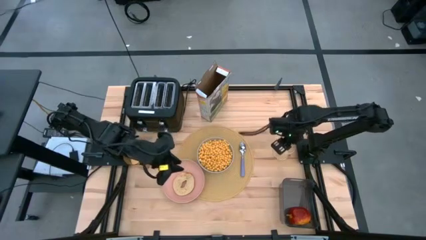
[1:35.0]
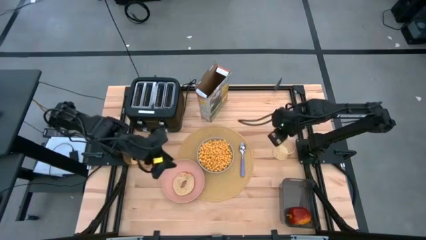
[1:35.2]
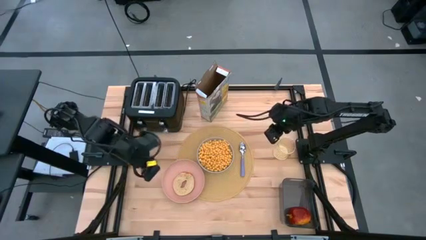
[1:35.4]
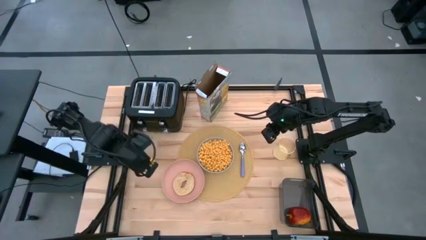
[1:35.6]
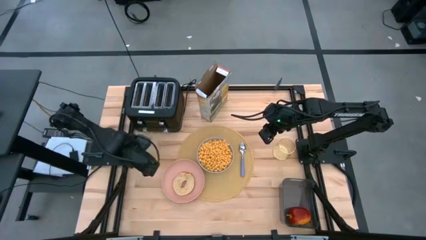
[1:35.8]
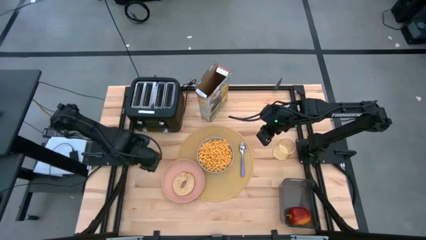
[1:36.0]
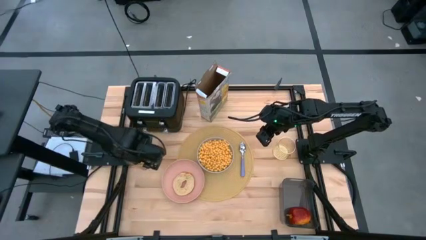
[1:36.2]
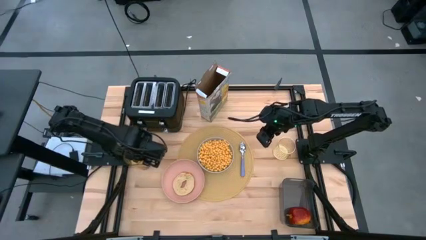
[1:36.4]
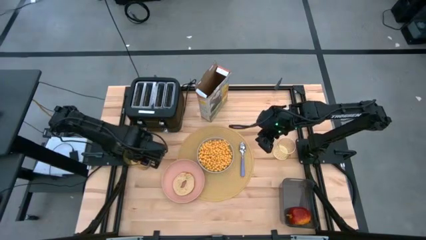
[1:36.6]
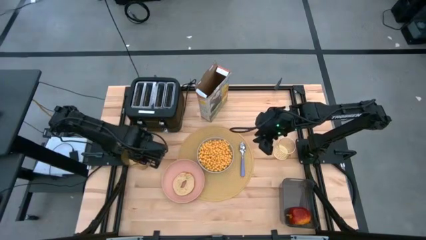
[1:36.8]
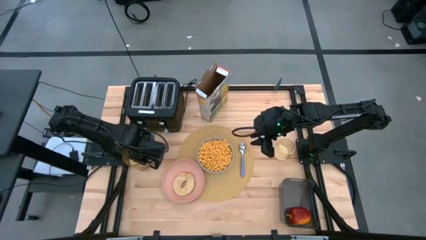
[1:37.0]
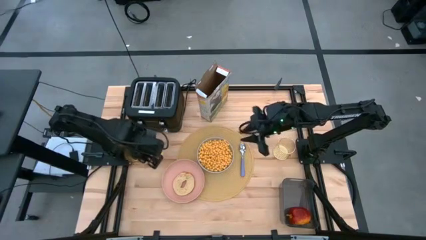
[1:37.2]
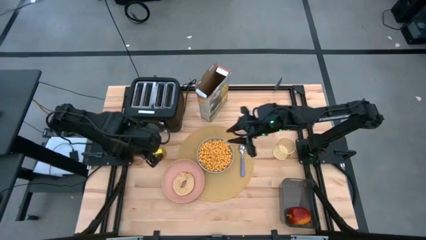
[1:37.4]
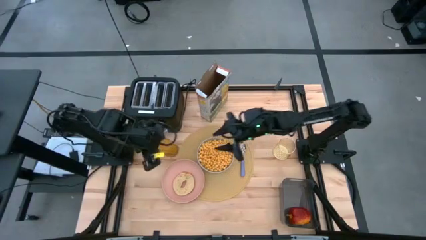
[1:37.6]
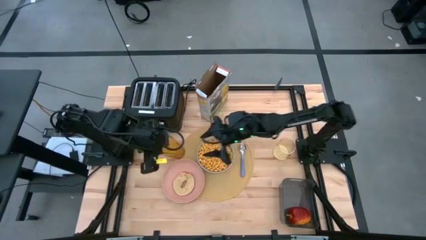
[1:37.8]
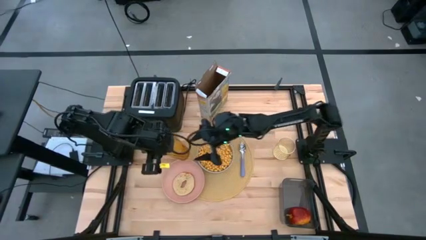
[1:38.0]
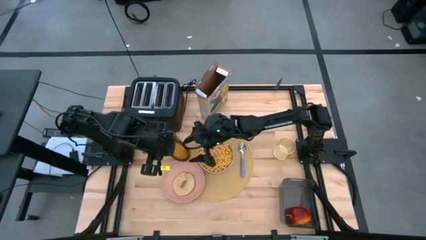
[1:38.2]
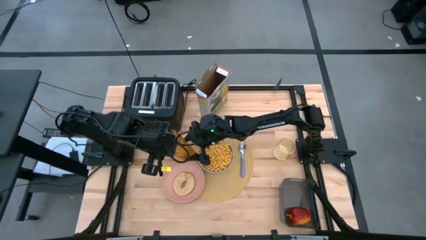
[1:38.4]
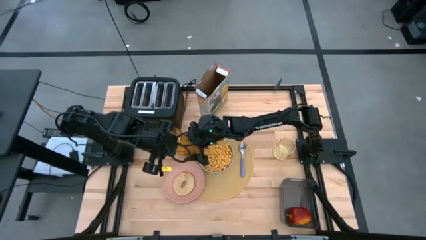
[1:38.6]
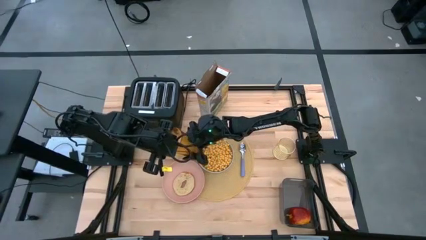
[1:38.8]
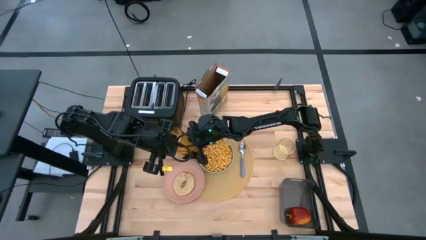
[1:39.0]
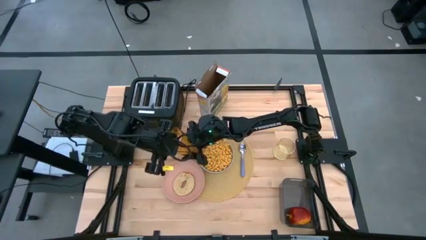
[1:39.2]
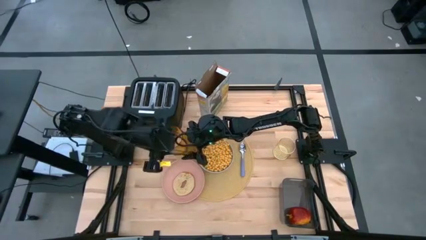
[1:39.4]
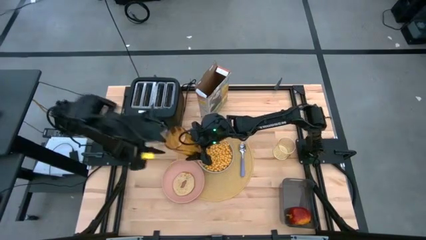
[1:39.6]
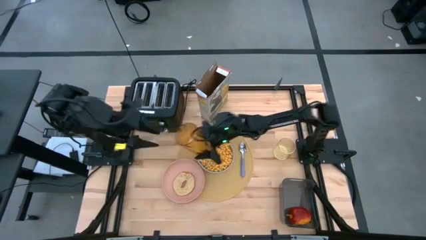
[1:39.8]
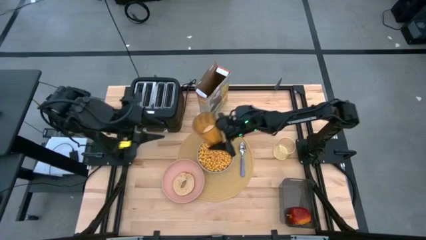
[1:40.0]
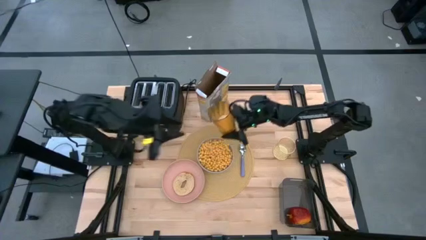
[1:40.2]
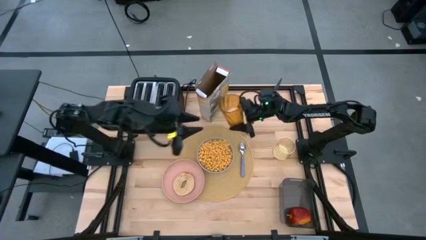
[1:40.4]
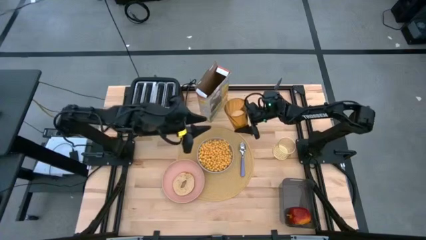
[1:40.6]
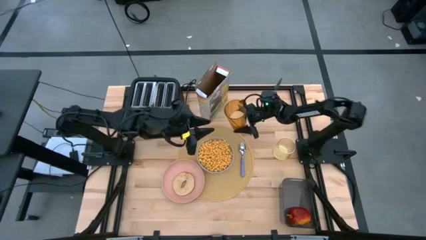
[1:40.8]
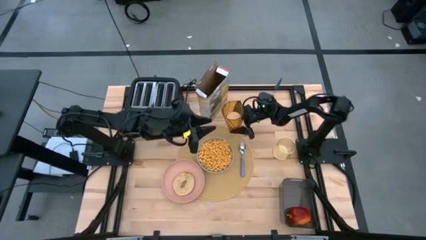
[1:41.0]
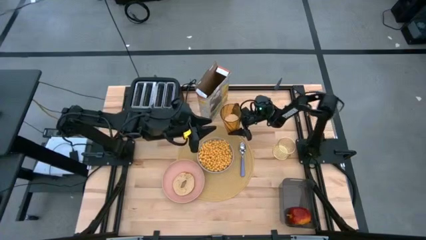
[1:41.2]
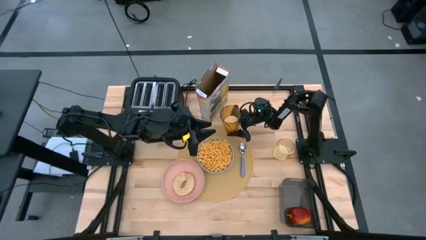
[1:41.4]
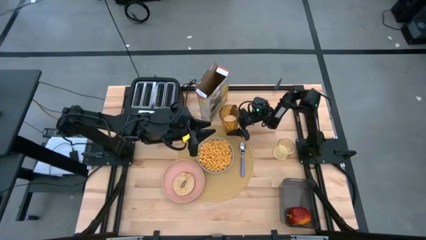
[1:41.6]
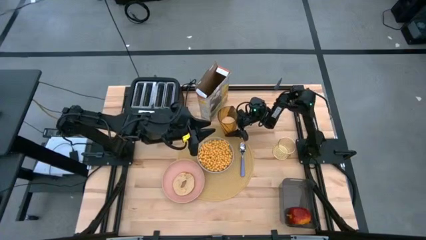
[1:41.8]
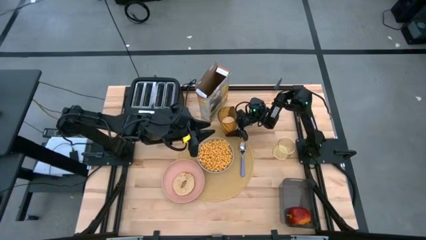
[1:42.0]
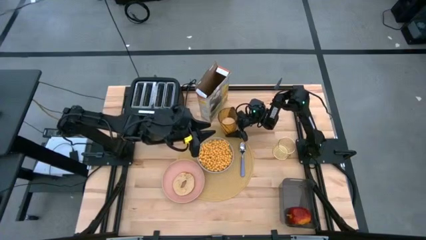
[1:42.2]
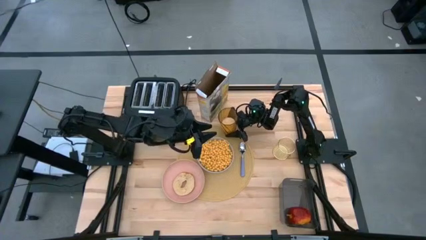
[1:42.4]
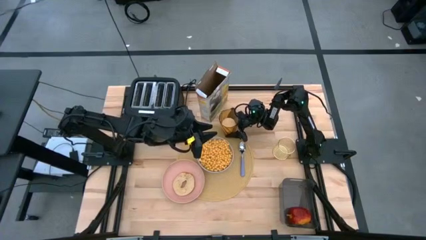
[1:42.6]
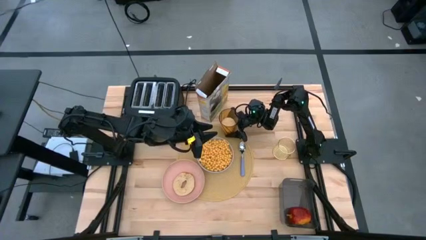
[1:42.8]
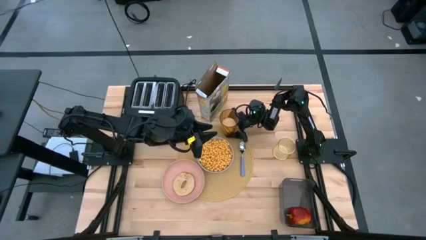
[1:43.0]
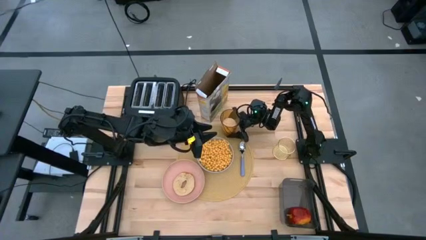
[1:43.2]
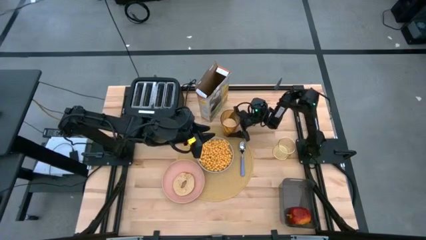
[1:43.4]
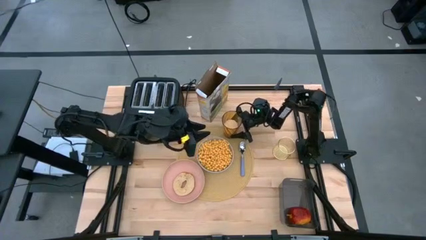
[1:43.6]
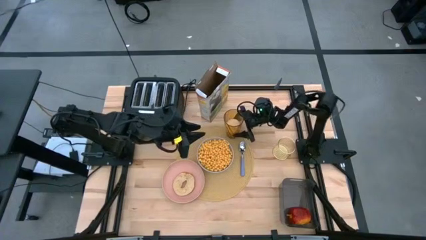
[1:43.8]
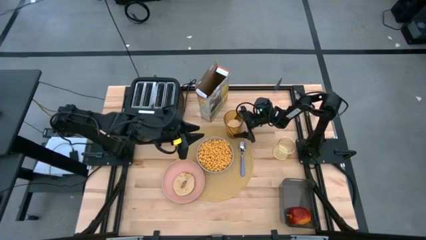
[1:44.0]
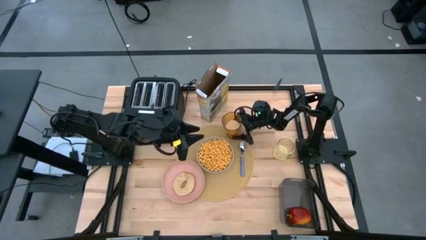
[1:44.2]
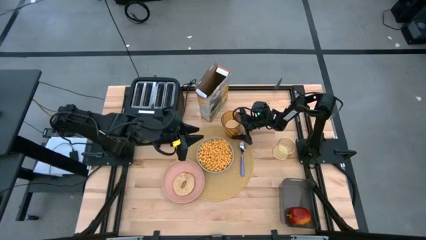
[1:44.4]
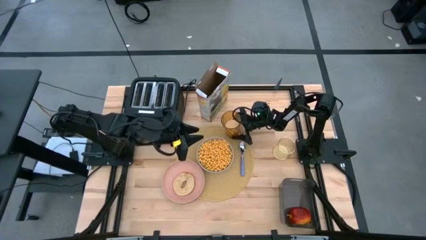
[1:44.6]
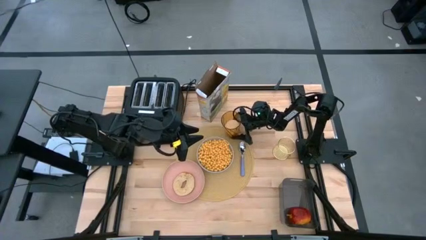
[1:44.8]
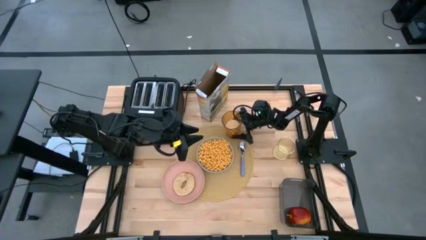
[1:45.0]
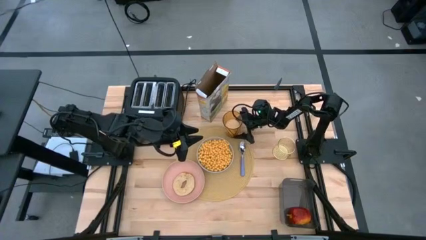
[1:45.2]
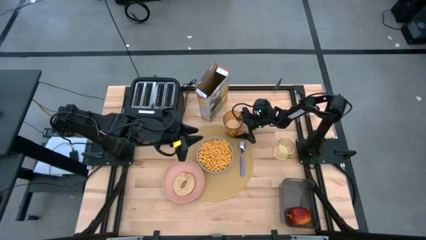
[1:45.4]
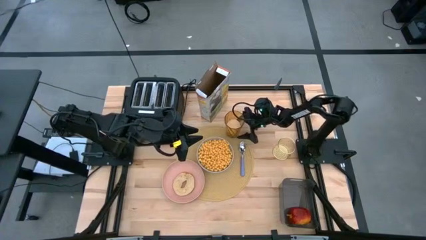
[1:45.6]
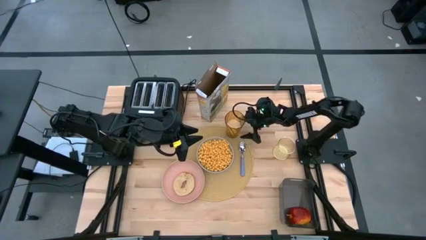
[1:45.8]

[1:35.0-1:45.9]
Task: Arrange a breakfast setting
Put the yellow cup on the brown placemat to the top right of the gray bowl

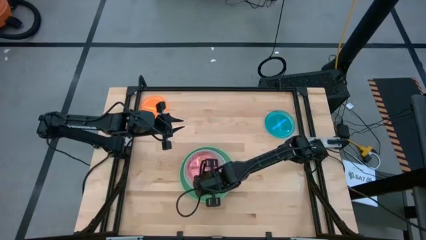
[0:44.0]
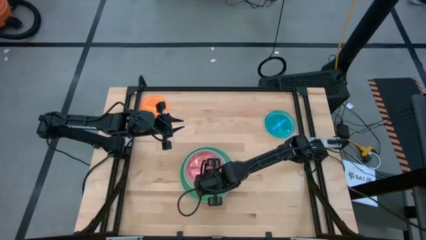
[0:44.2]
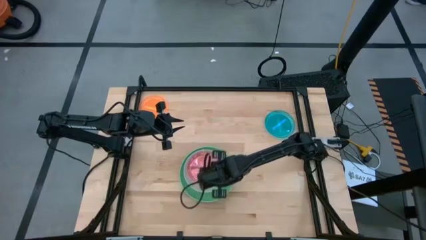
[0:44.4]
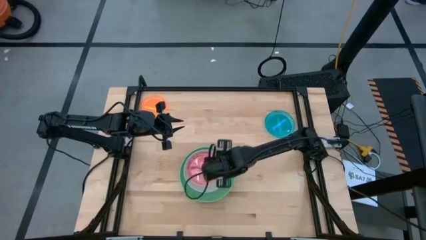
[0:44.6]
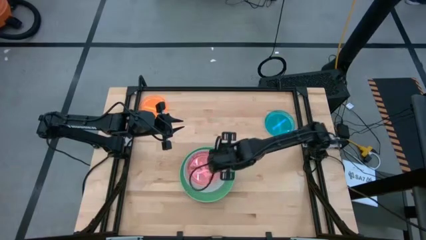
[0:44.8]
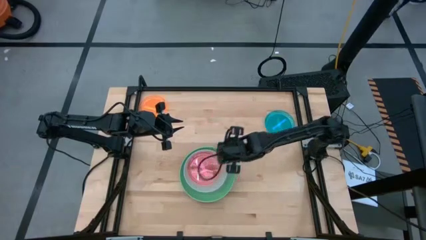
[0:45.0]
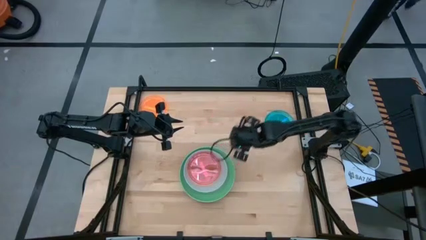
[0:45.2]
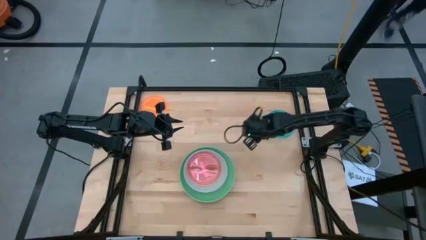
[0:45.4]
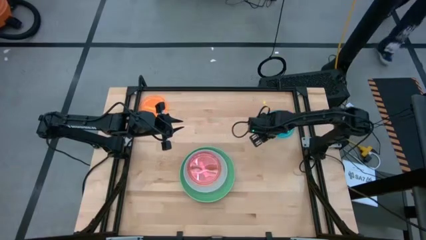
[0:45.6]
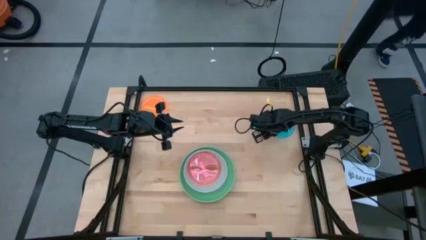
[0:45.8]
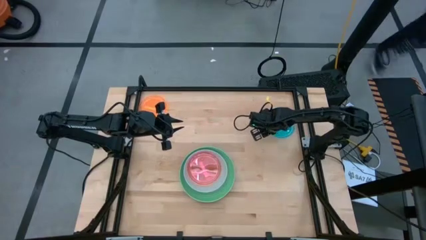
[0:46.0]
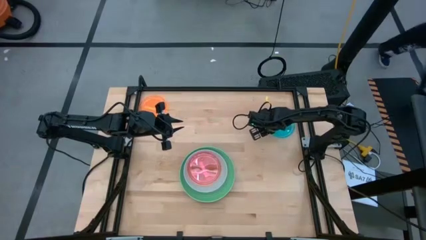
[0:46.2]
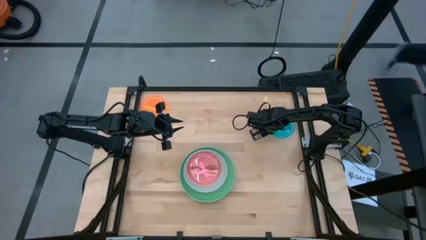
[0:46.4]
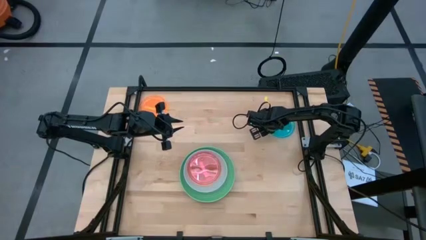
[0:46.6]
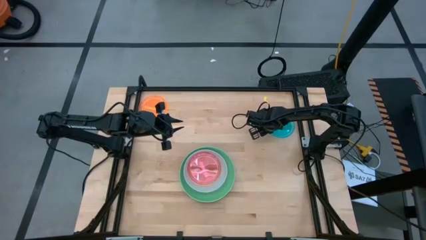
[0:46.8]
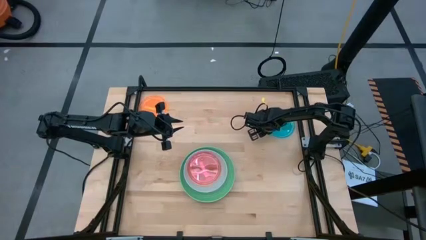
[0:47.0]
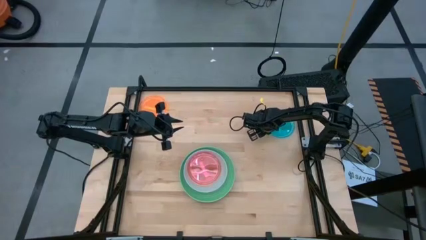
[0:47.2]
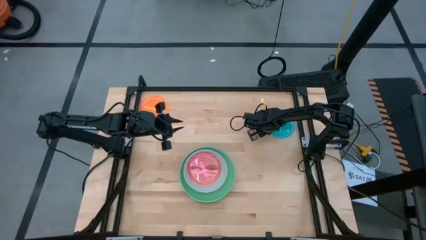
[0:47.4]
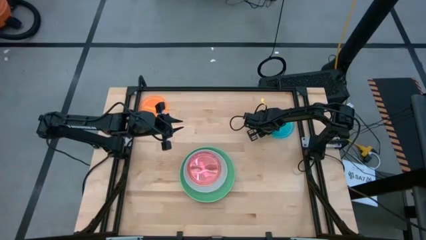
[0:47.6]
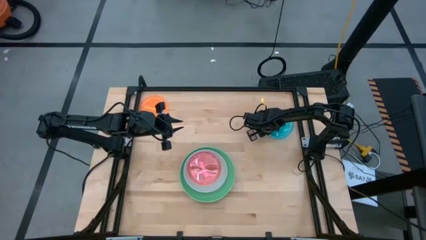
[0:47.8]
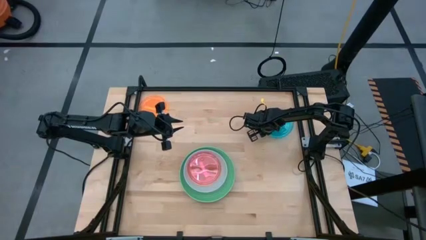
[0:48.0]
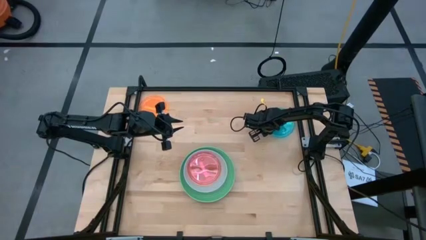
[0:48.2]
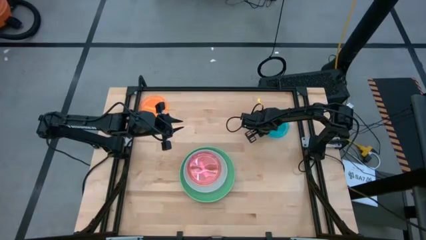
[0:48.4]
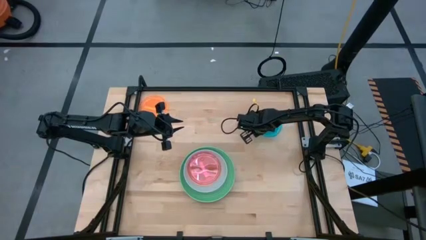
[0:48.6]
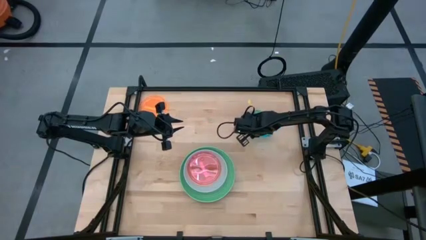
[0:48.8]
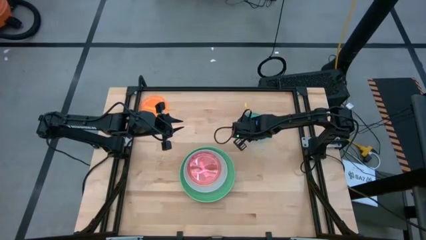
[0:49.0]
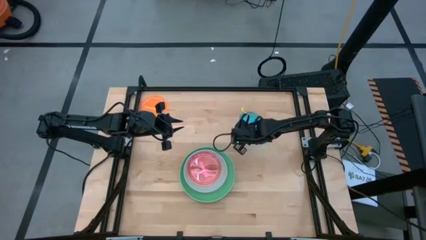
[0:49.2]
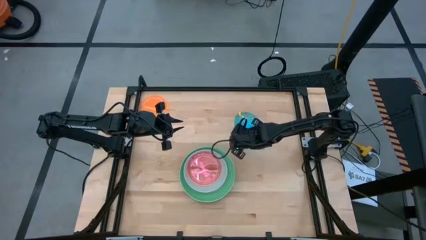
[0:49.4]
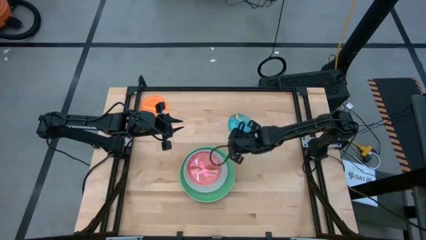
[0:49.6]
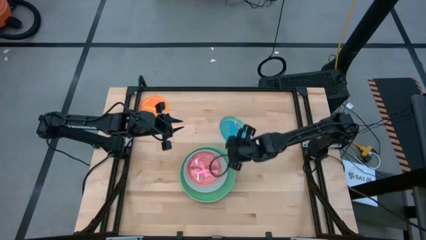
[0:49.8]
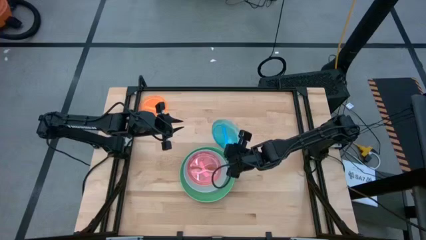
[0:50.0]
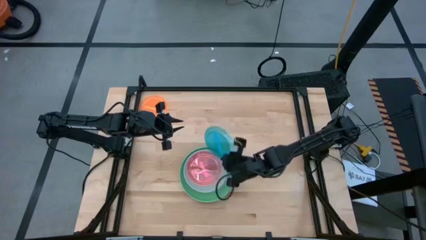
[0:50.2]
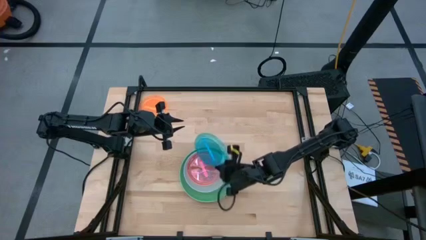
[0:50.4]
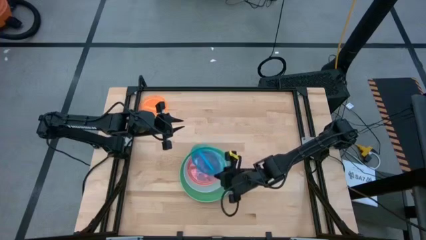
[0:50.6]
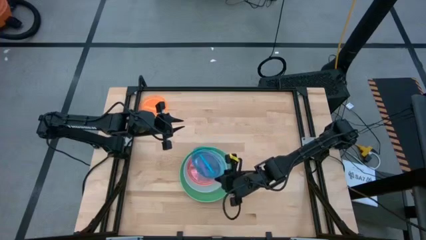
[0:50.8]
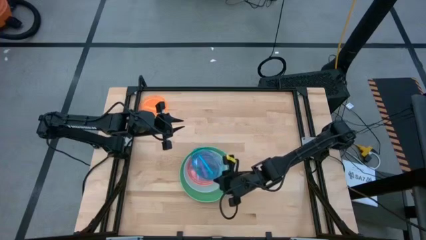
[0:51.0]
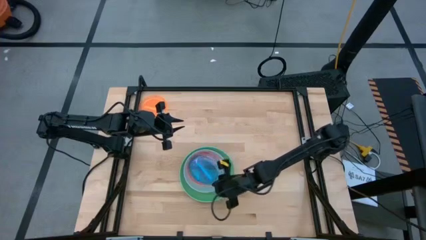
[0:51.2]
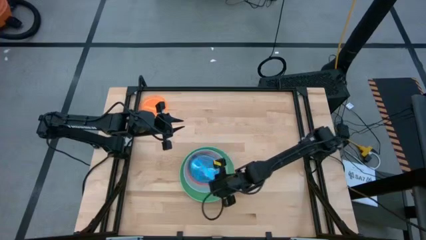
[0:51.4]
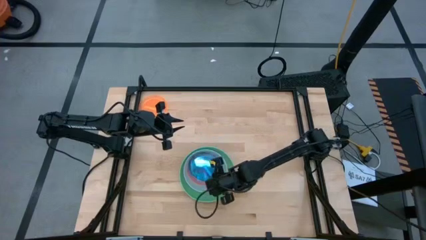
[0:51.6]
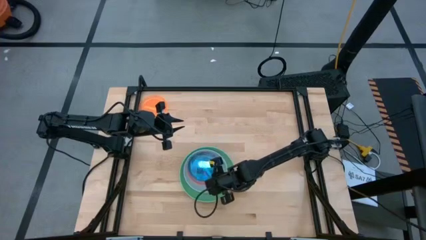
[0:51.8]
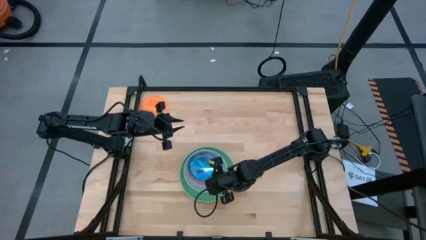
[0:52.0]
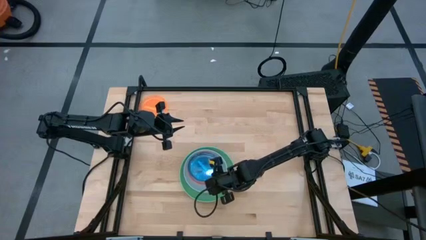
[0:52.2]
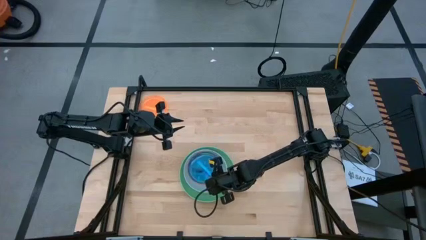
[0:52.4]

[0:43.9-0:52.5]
Task: Stack plastic plates
Stack the small blue plate on the small pink plate
